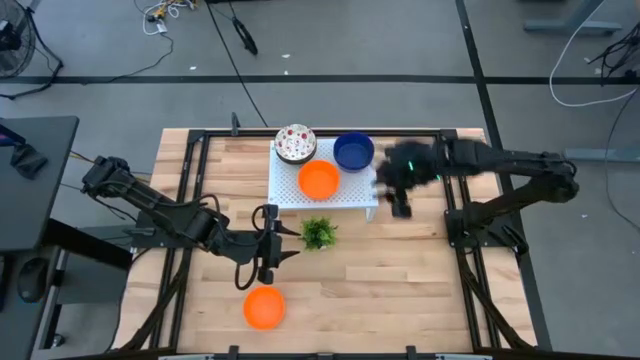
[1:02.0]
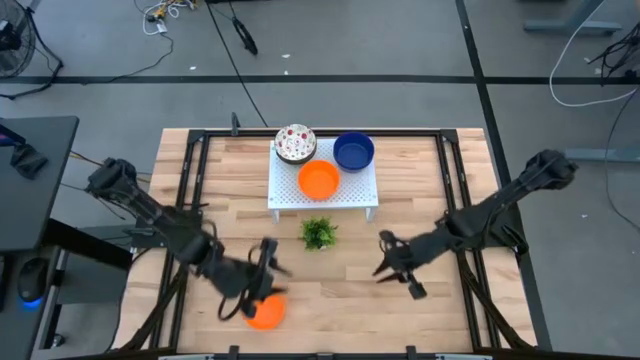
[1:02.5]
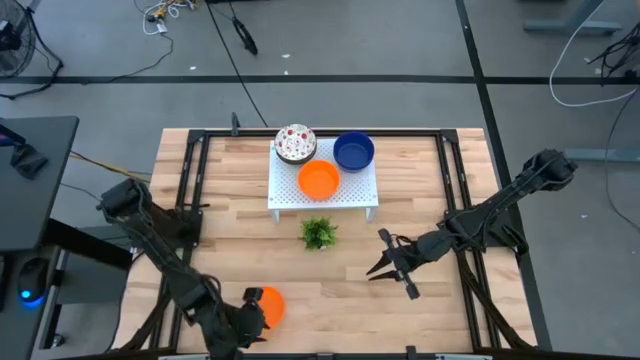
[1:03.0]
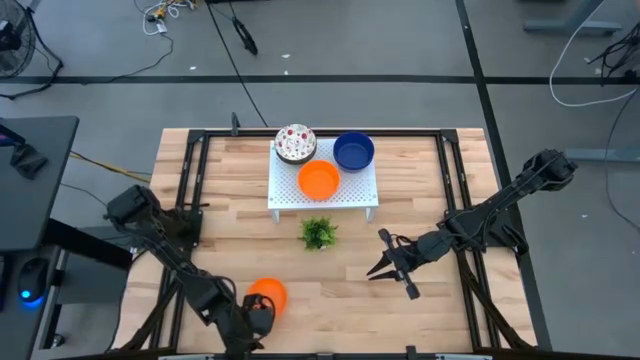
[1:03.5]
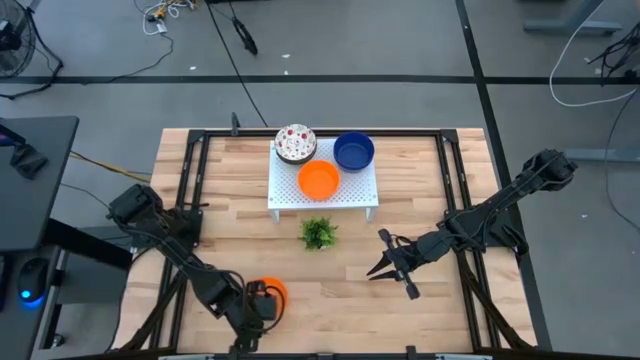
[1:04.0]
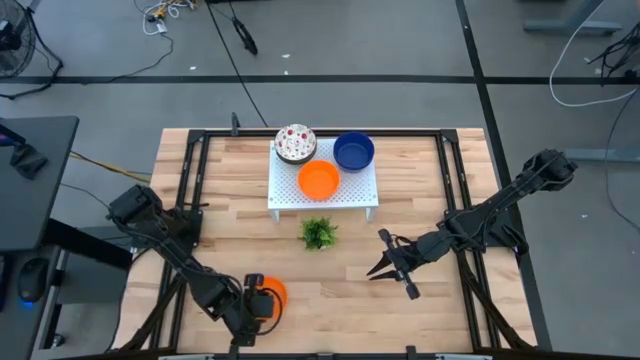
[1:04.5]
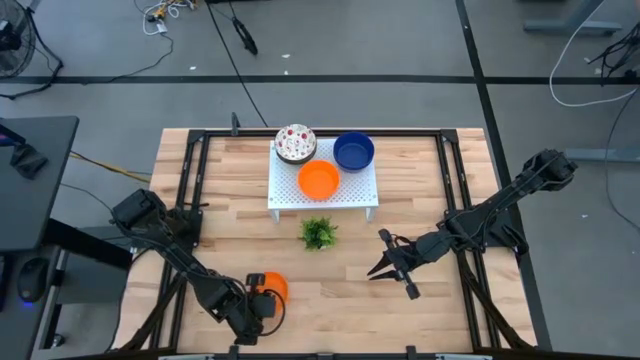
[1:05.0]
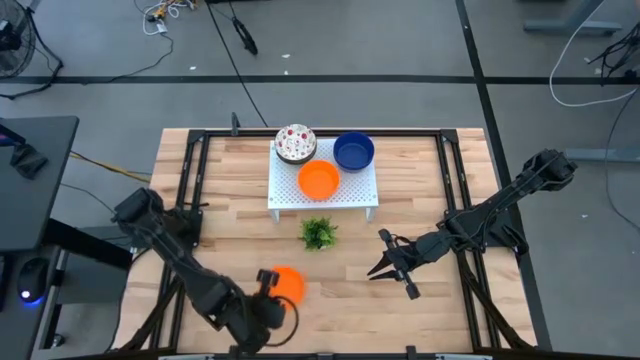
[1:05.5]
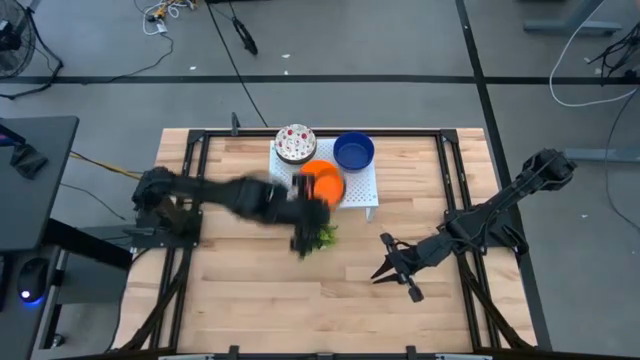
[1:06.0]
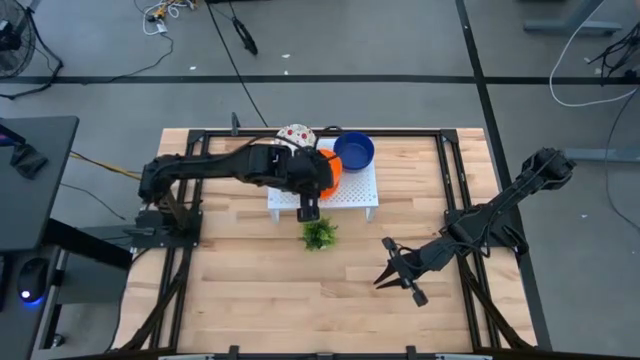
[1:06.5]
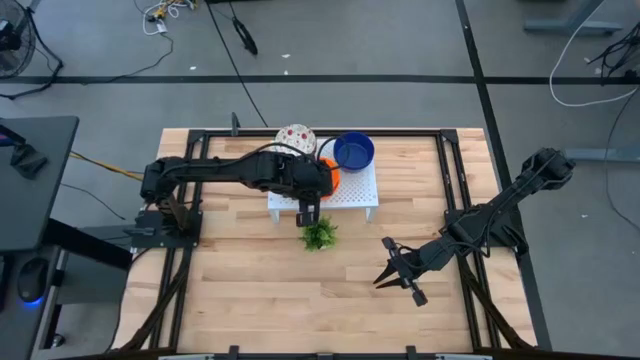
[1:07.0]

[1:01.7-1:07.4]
Task: Pick & Place Mini bowls
Stack the orange bowl on top of the orange bowl on the shelf

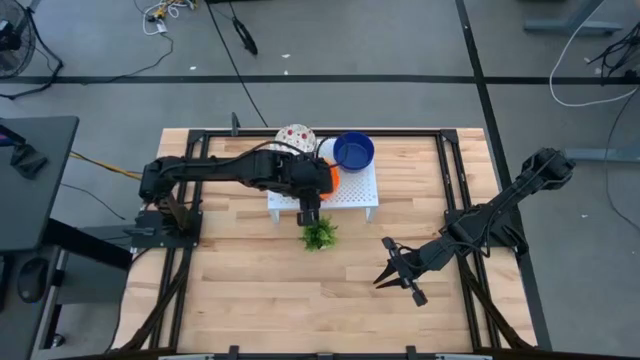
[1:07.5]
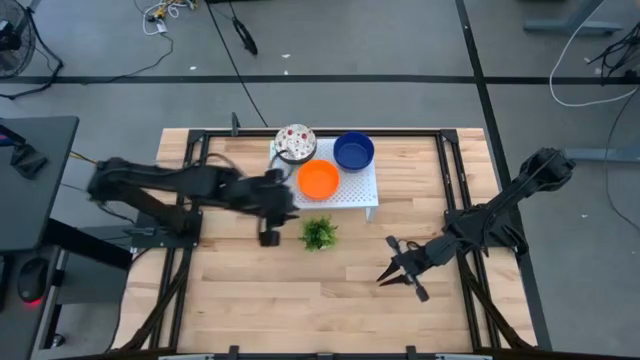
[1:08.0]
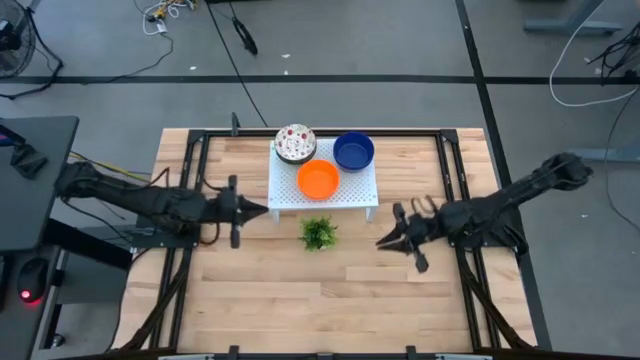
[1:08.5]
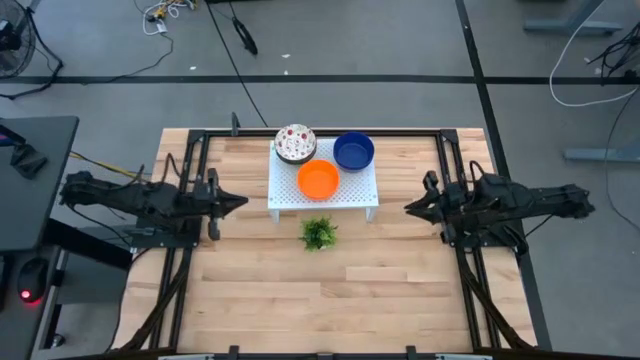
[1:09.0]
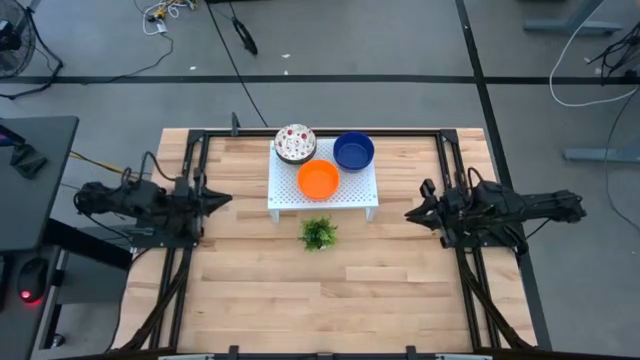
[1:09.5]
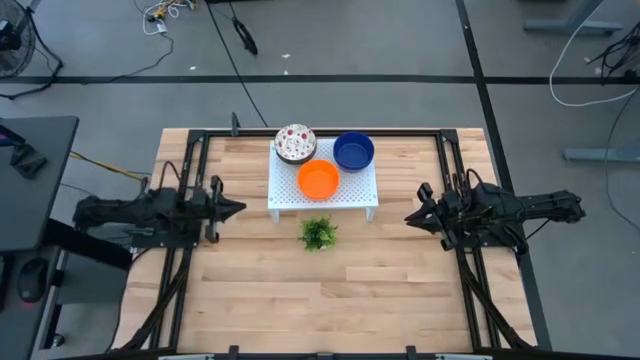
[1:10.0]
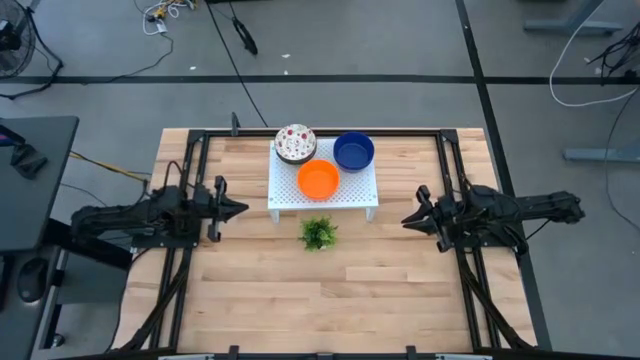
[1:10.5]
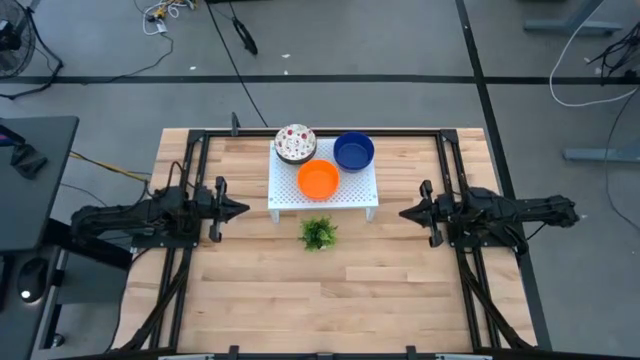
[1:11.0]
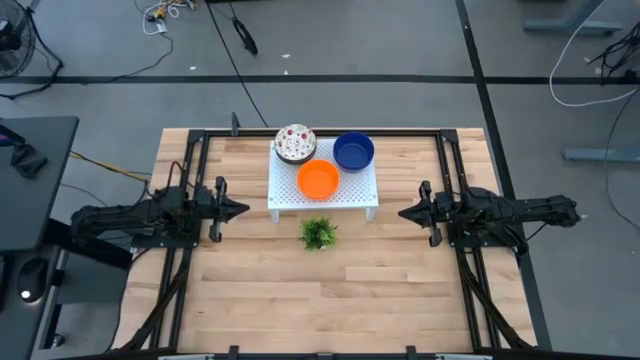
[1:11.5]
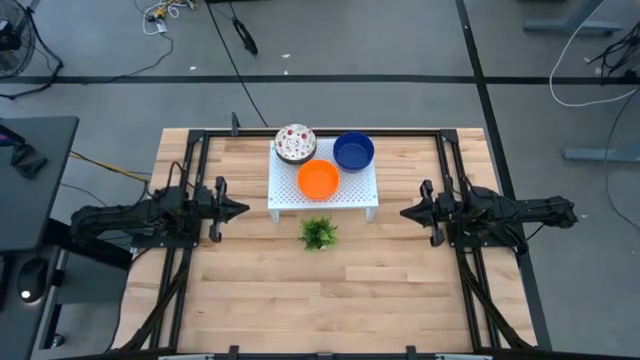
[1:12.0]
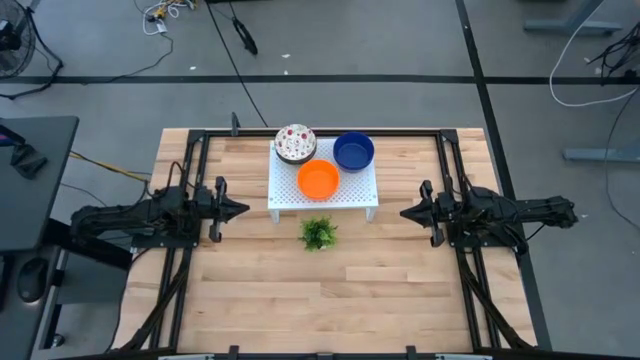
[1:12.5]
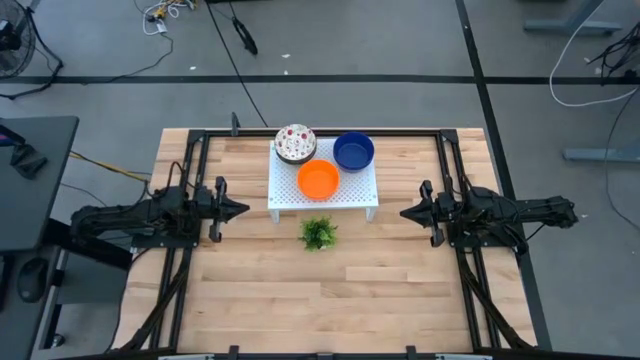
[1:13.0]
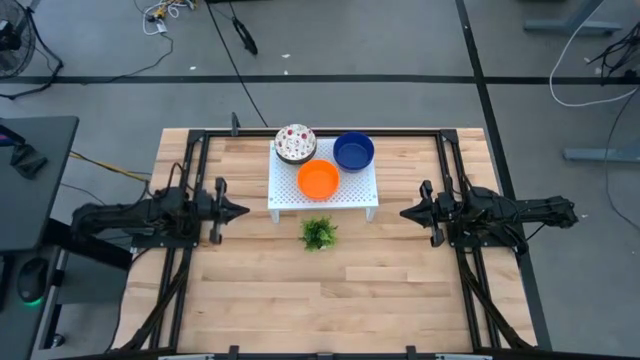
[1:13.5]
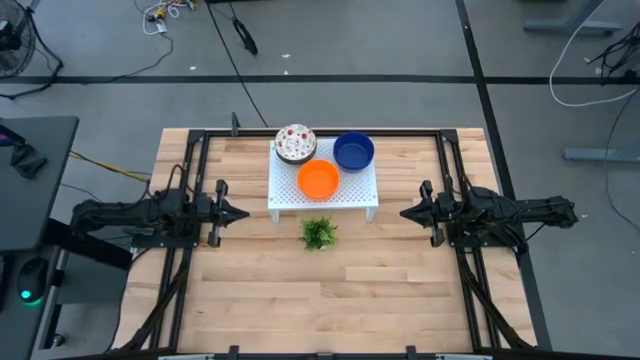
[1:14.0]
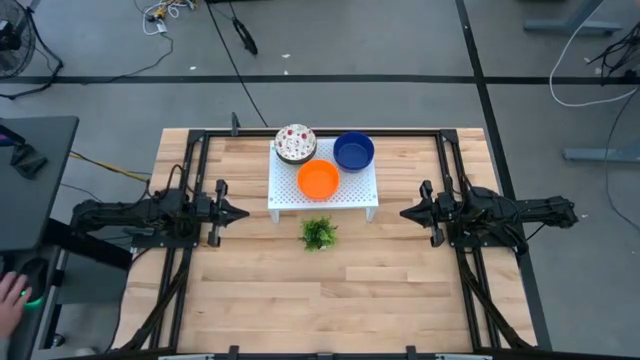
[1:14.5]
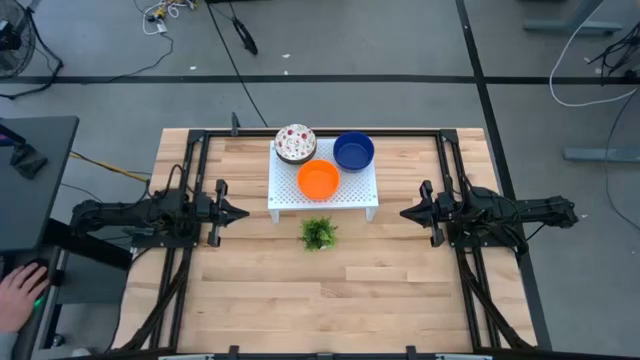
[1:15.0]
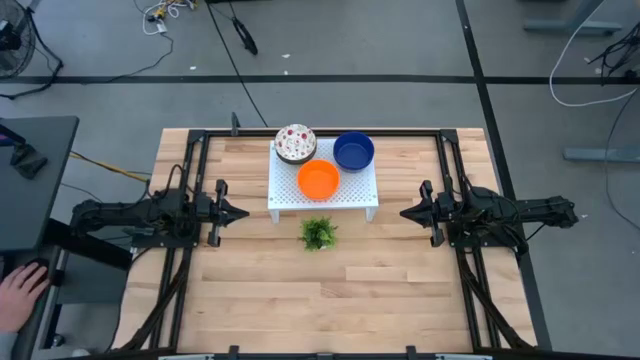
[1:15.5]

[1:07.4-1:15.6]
Return to Home Position

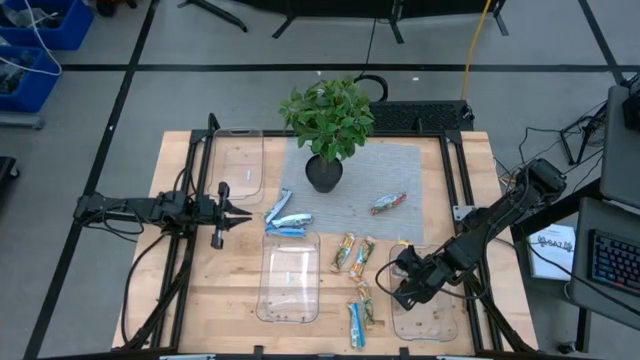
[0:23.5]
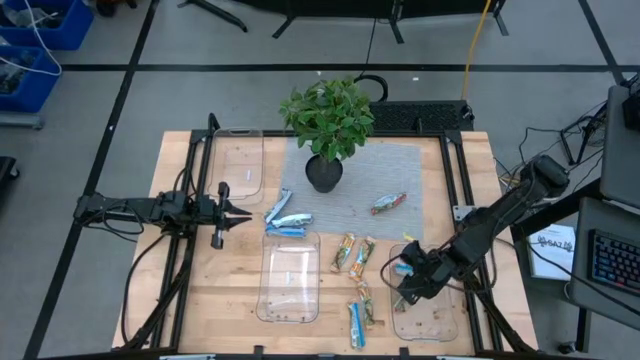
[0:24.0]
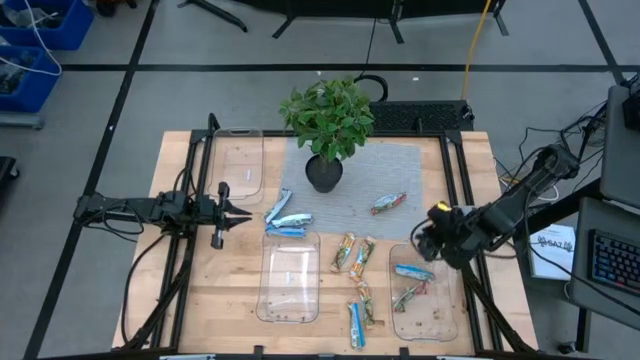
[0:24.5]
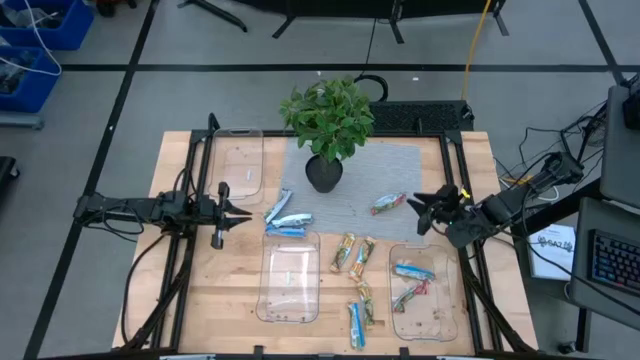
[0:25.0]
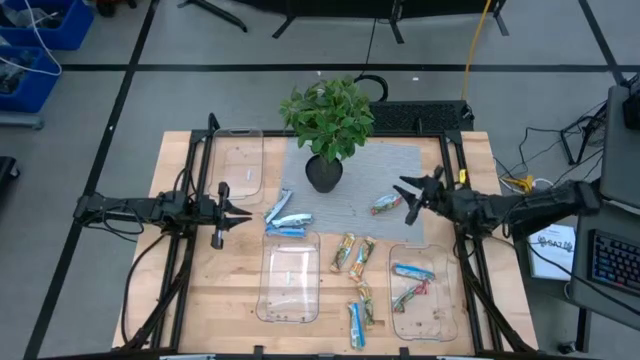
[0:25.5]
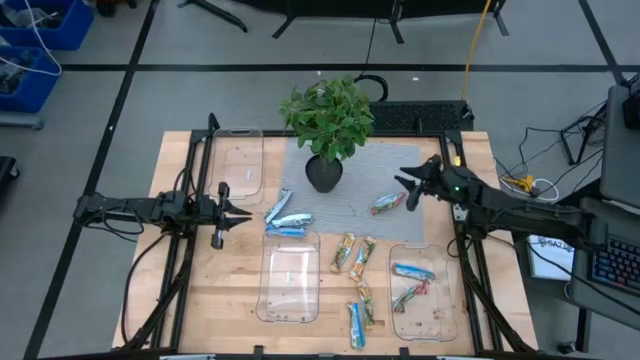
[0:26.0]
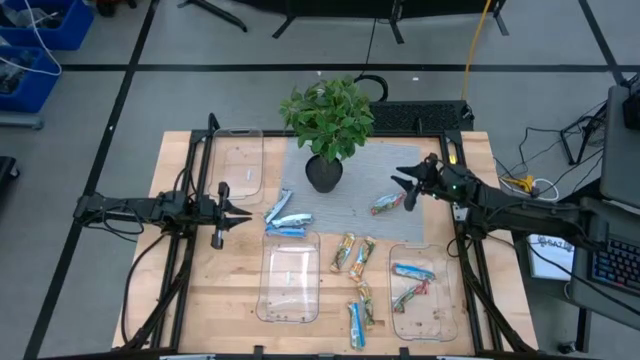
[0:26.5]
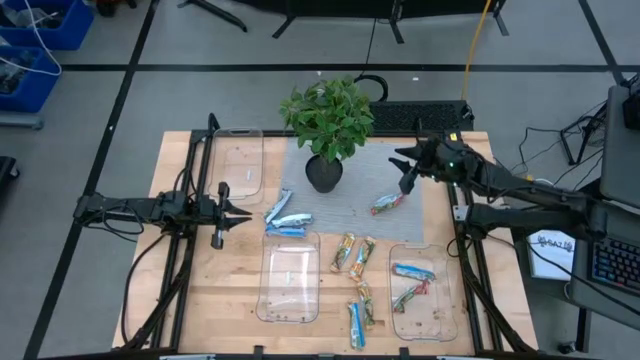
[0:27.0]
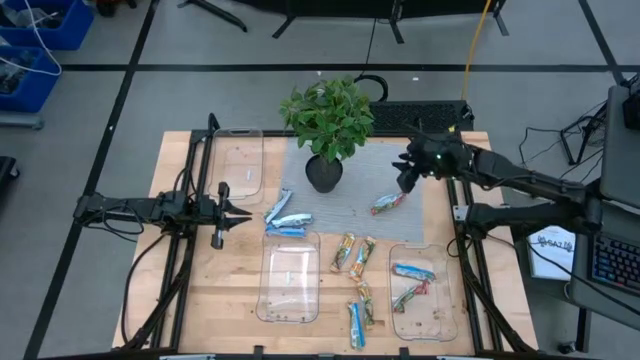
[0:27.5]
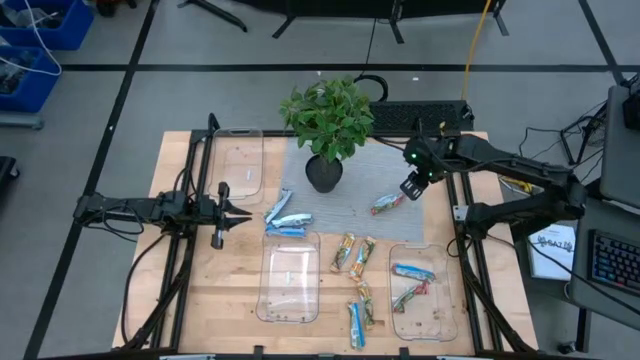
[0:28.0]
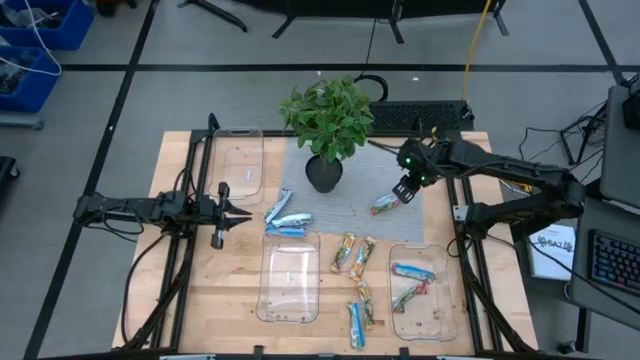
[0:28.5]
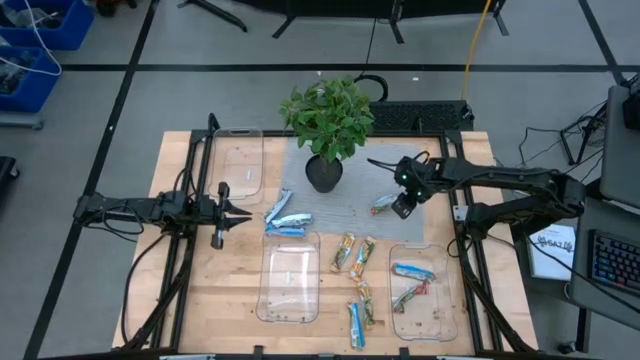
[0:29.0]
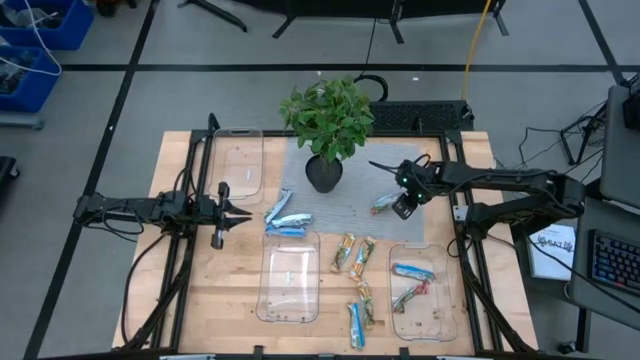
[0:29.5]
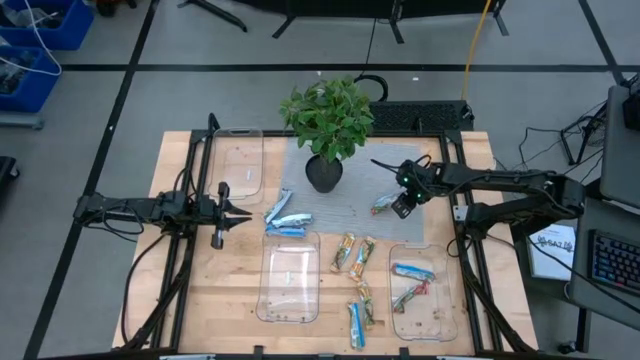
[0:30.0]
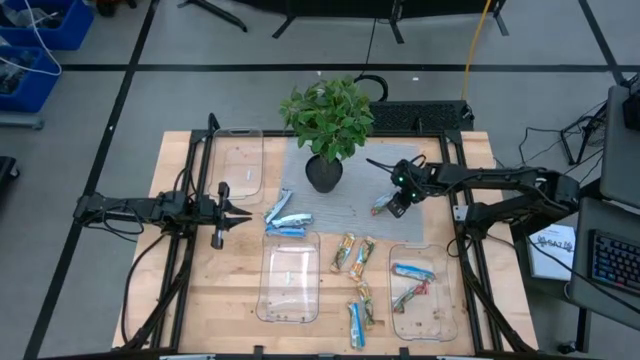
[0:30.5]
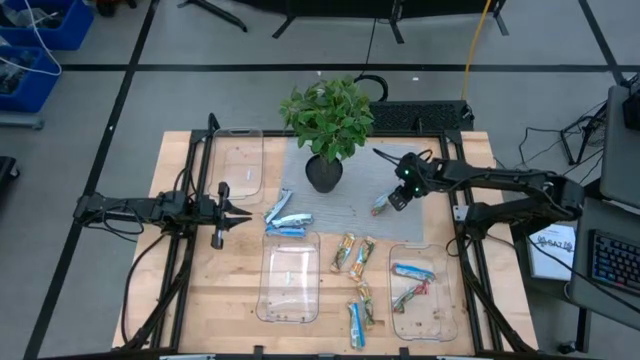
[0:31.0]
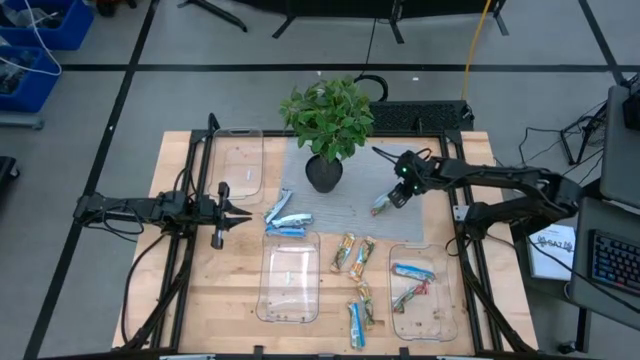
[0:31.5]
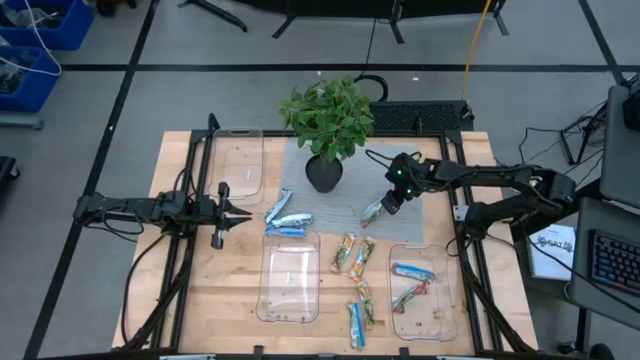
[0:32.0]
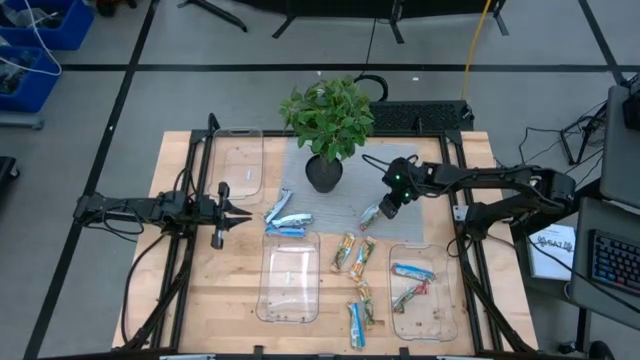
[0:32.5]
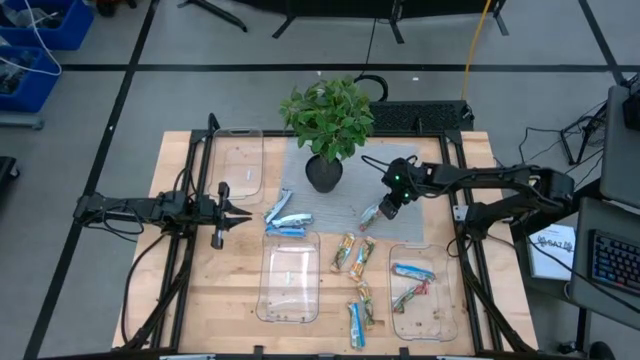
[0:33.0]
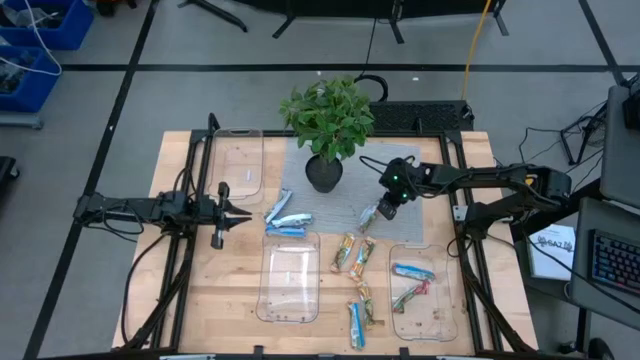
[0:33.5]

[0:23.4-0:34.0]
Task: Pick and place Granola Bars by type
Put the red granola bar into the bottom right transparent bin
